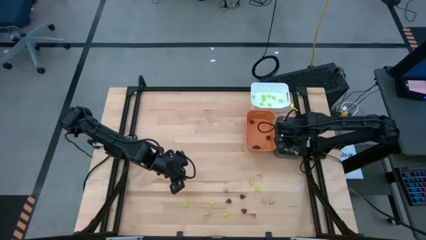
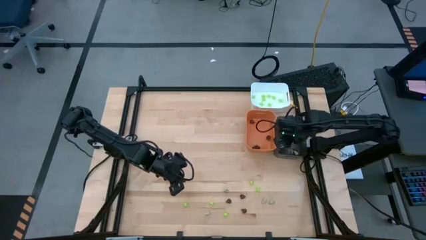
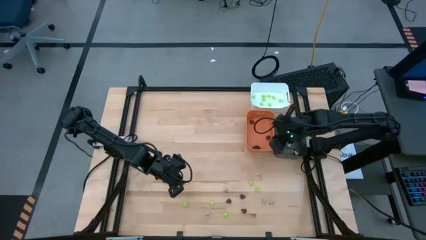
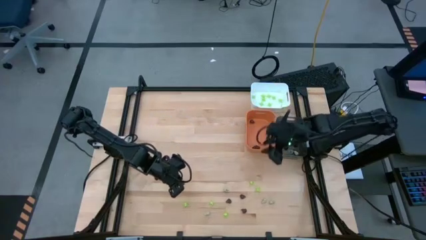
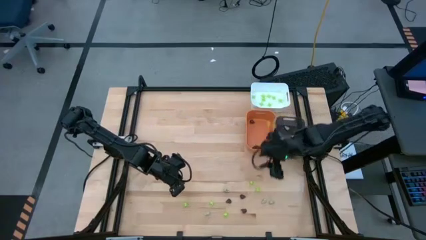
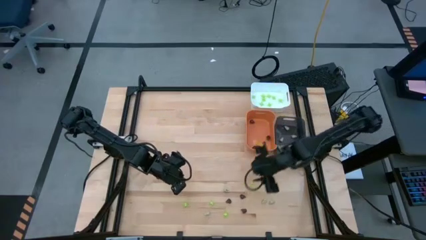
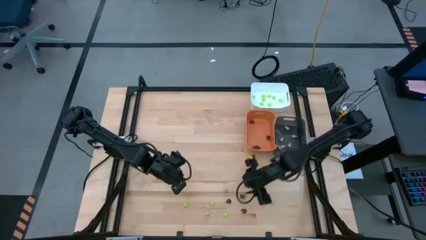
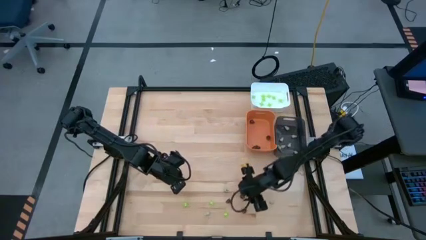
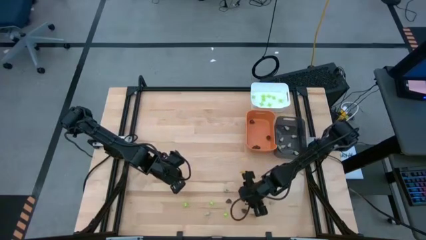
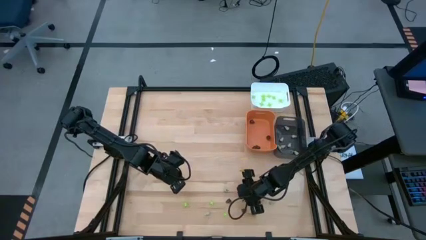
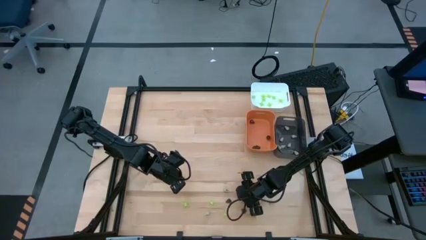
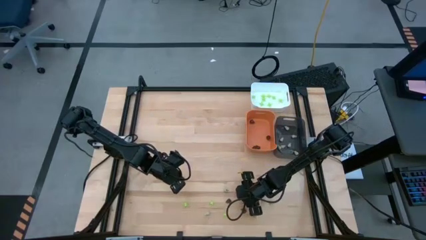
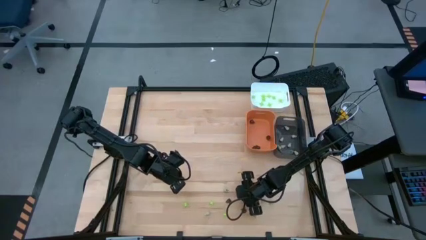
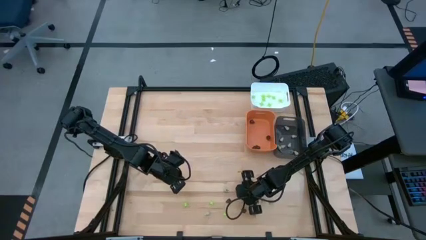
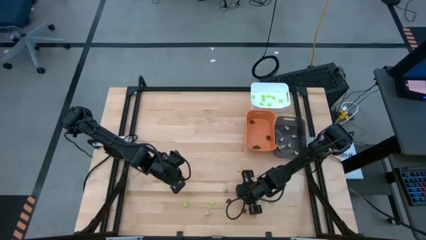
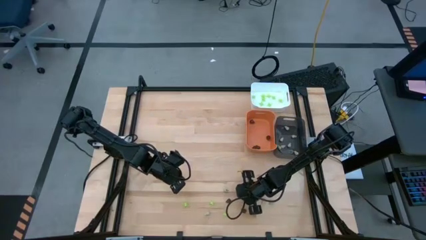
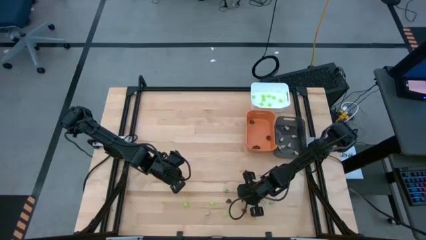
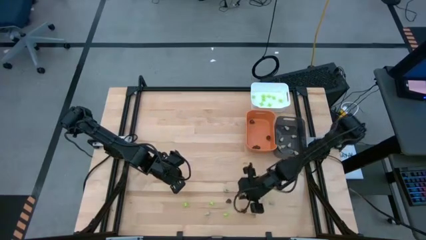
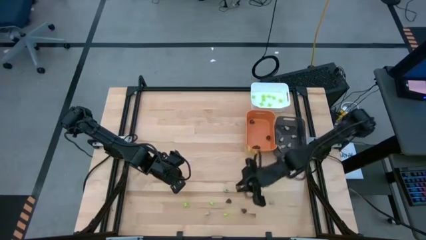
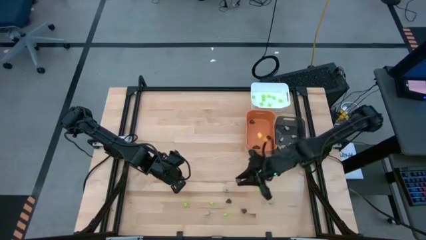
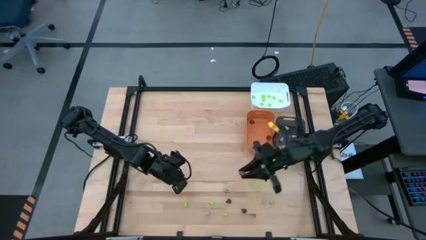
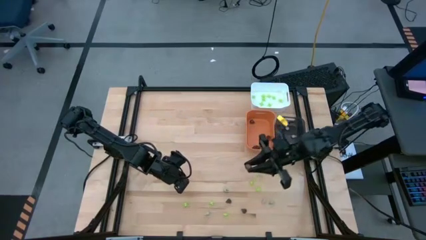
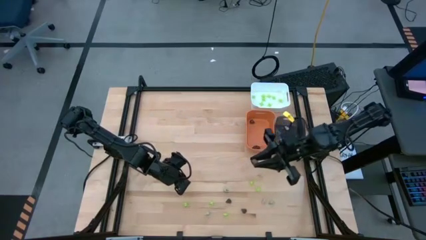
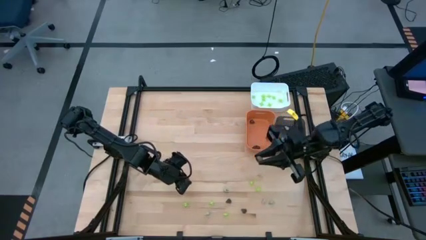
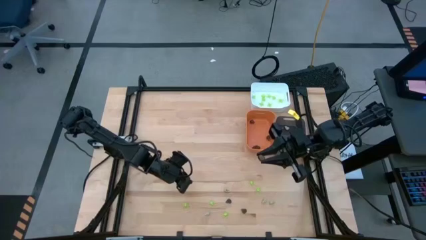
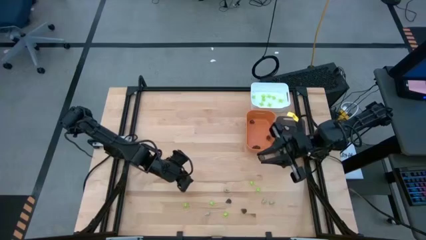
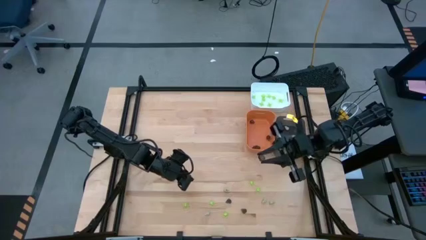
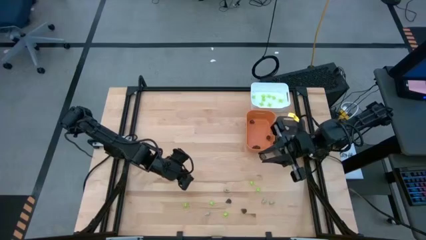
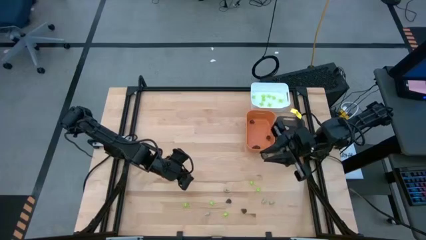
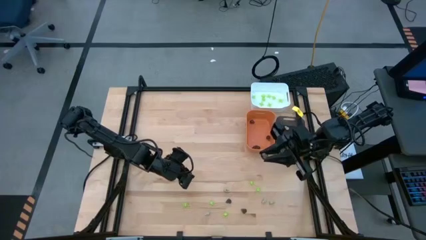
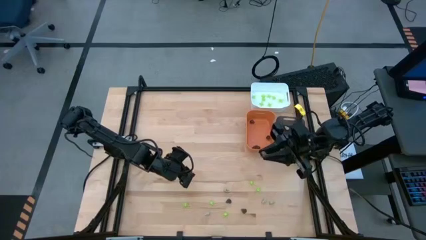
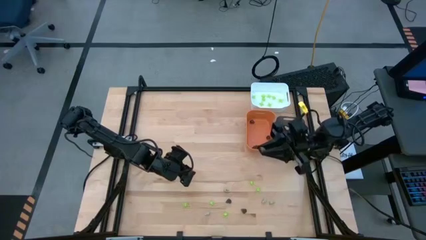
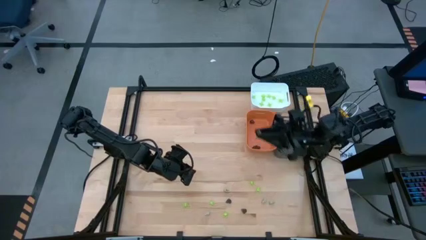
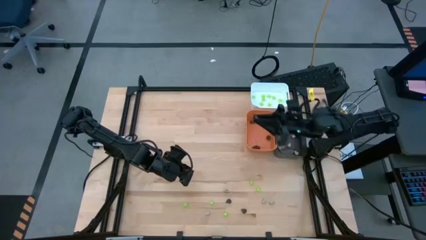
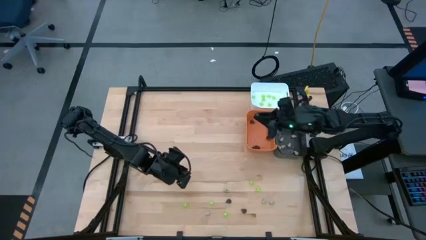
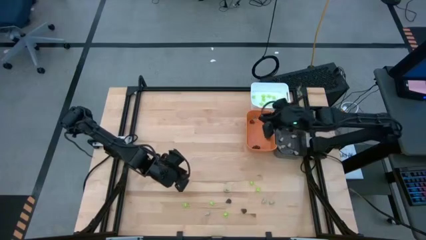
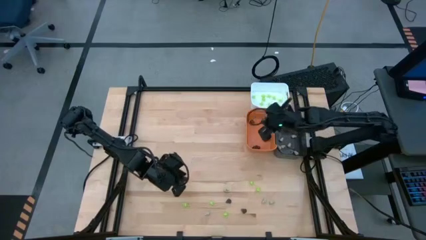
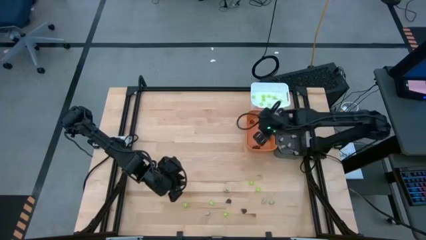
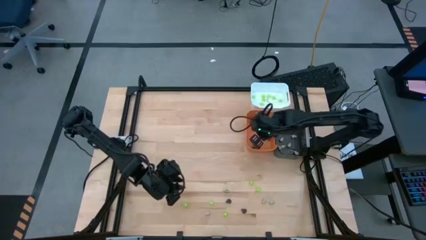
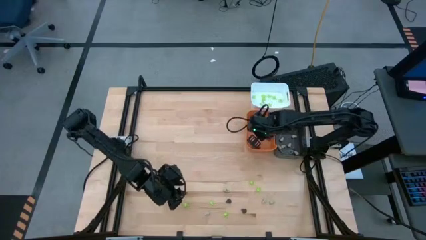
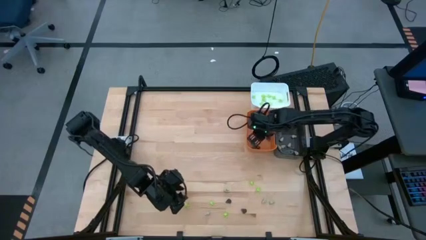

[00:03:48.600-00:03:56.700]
Task: Sort Halloween decoration
Put the black skull toy into the orange bin

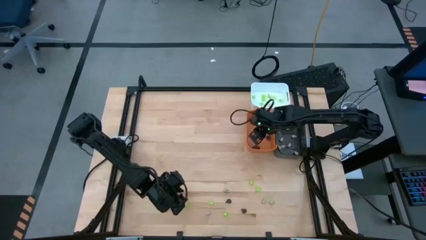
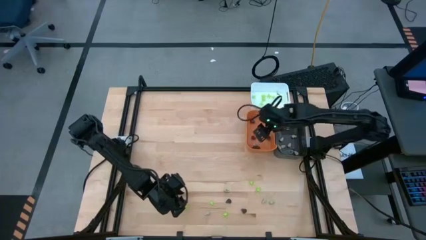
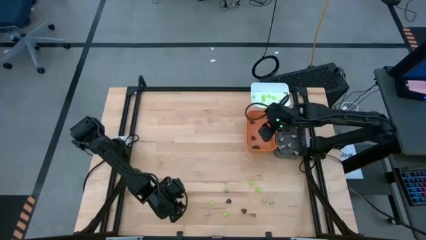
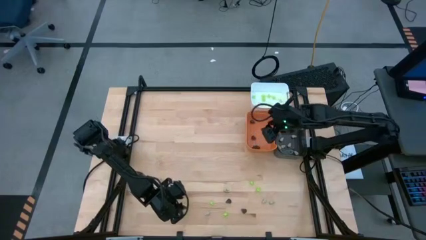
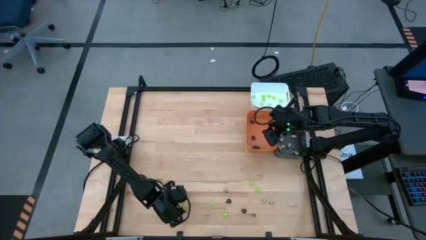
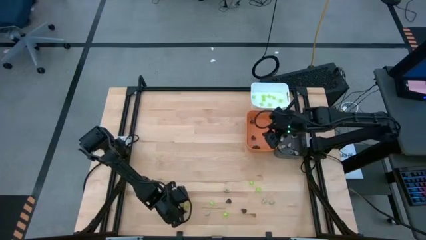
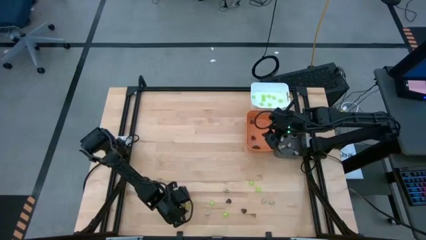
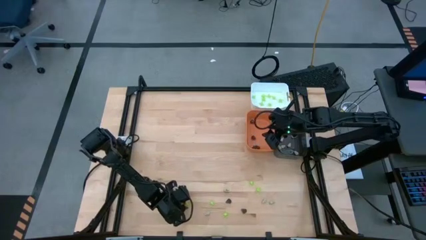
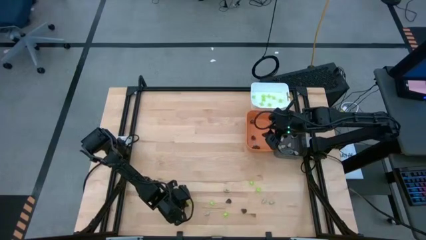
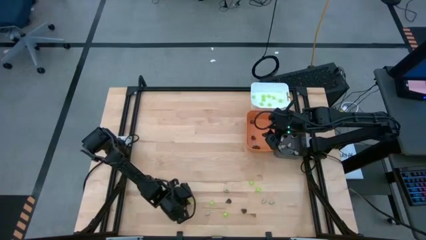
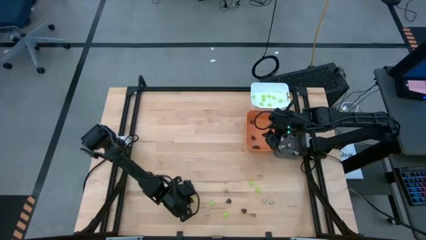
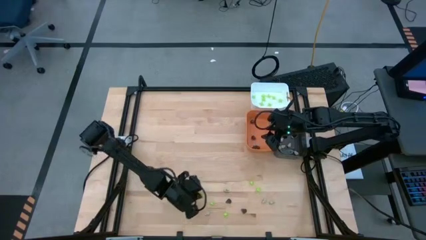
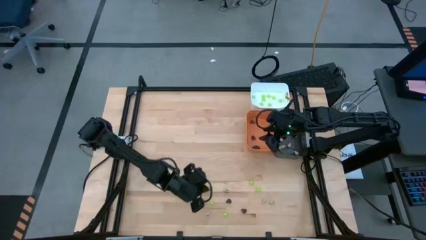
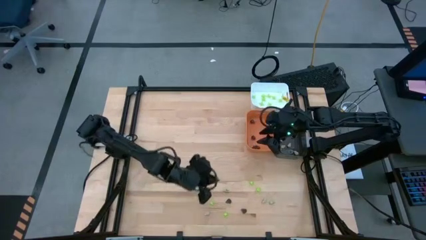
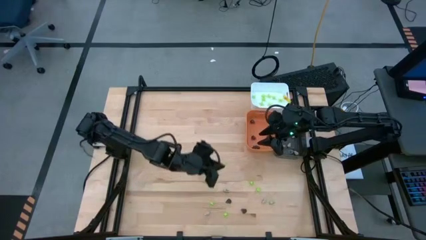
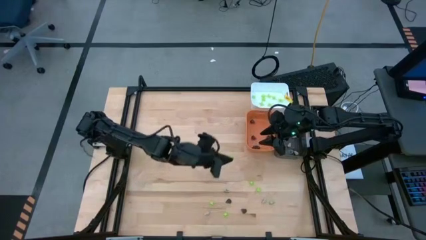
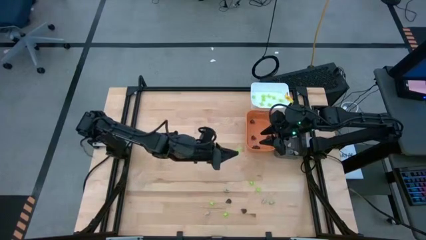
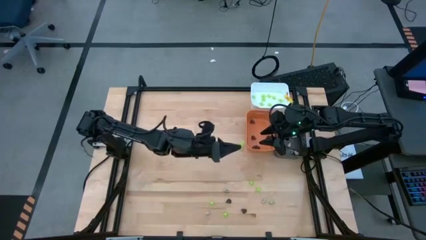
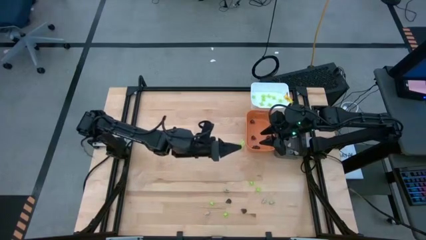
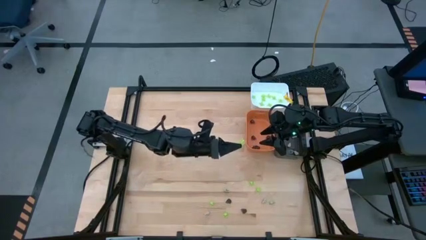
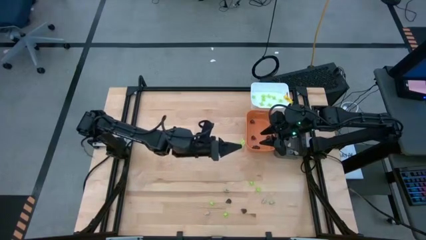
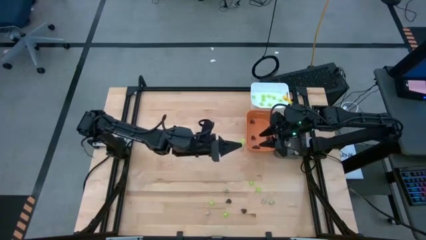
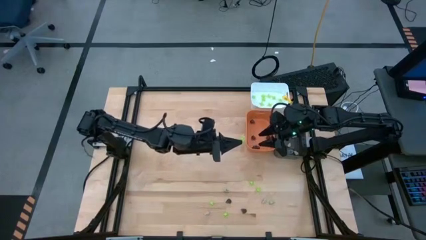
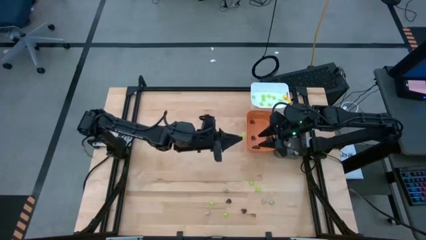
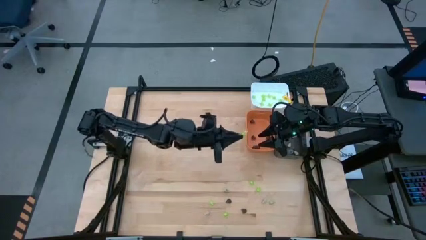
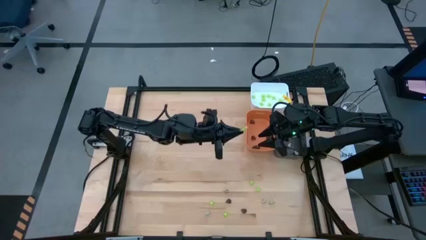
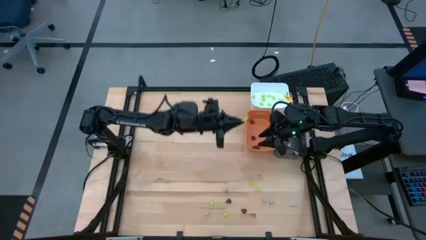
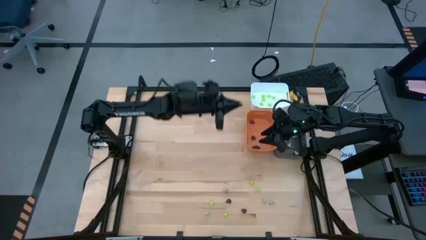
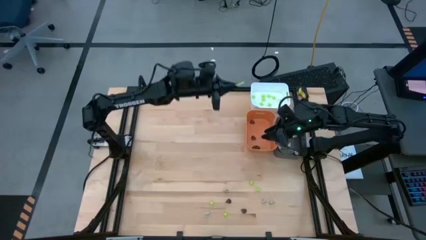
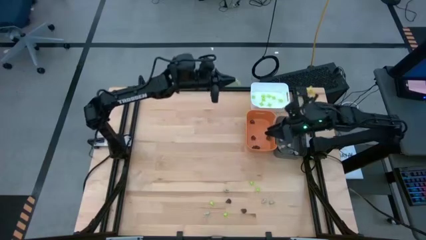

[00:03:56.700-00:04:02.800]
Put the green spider toy into the white bin
